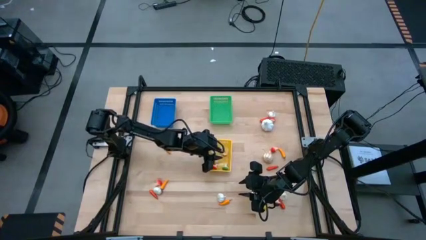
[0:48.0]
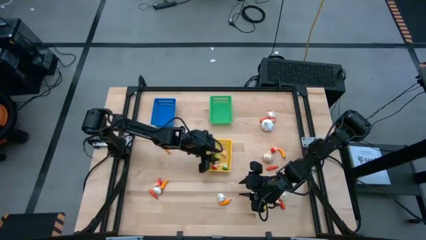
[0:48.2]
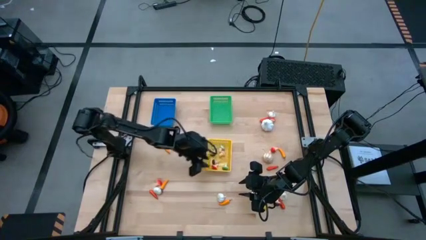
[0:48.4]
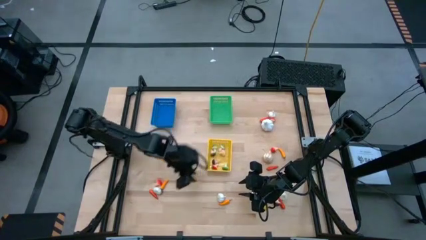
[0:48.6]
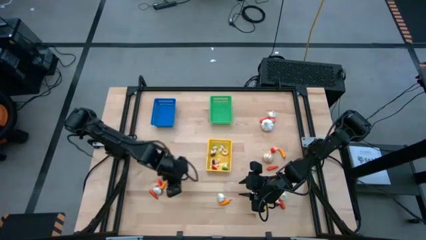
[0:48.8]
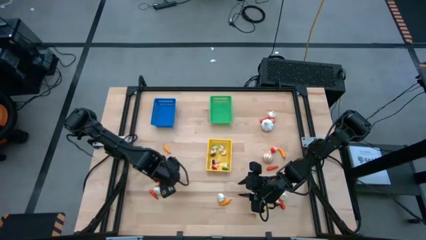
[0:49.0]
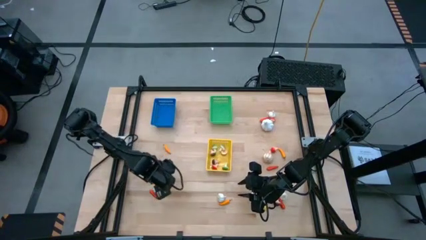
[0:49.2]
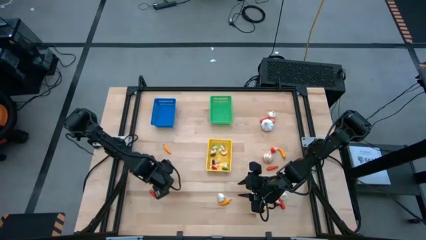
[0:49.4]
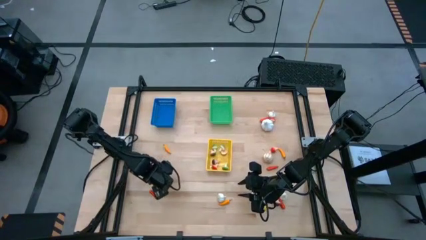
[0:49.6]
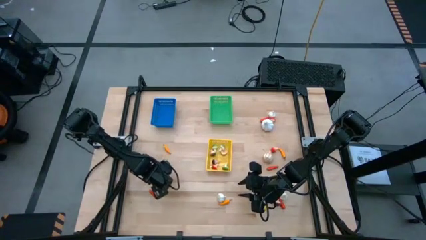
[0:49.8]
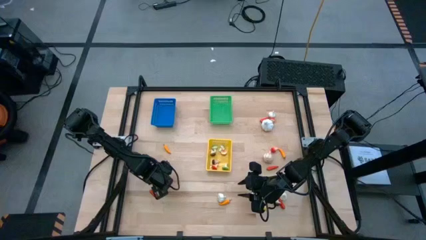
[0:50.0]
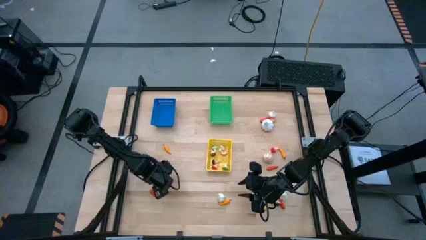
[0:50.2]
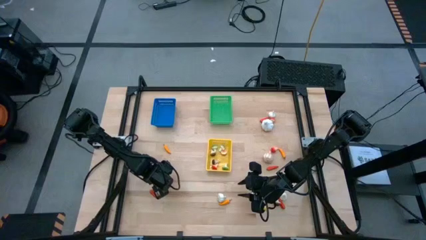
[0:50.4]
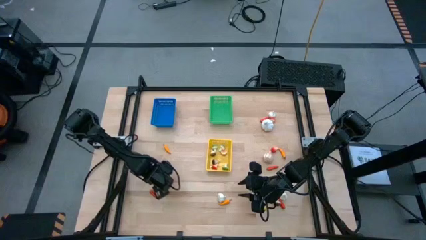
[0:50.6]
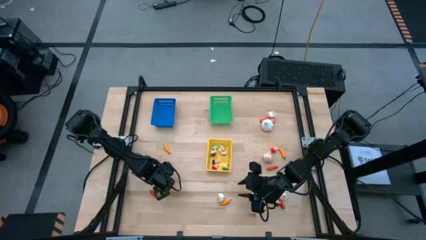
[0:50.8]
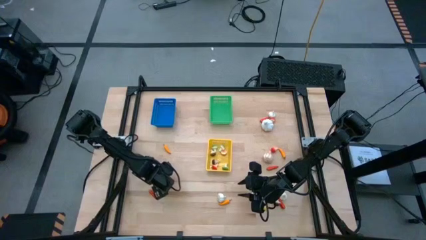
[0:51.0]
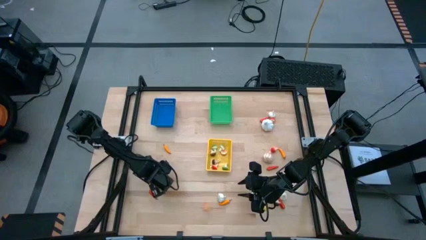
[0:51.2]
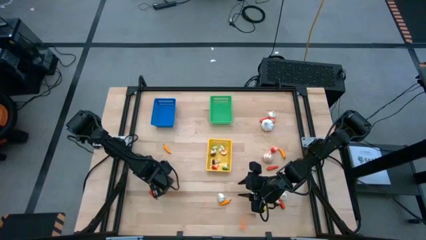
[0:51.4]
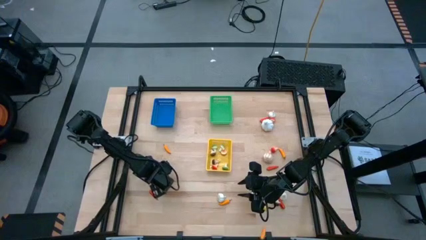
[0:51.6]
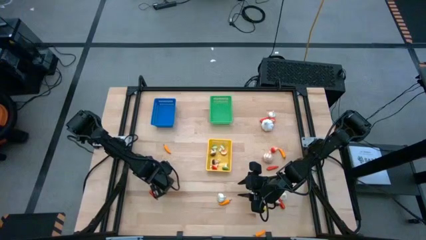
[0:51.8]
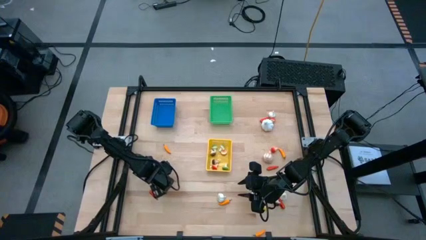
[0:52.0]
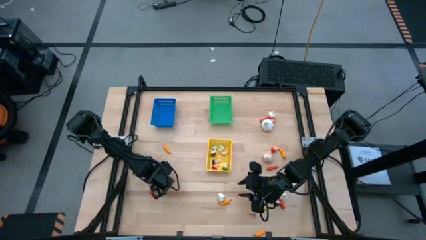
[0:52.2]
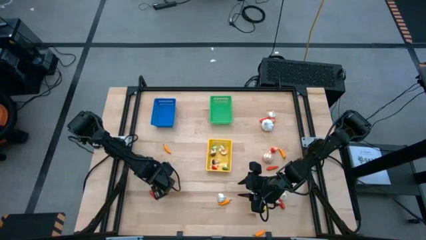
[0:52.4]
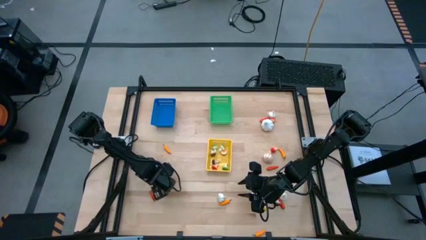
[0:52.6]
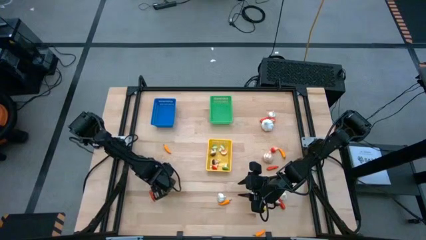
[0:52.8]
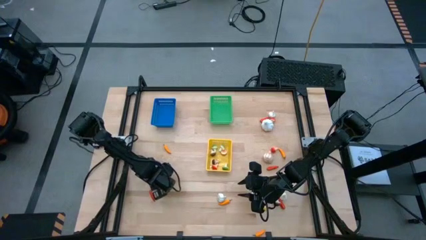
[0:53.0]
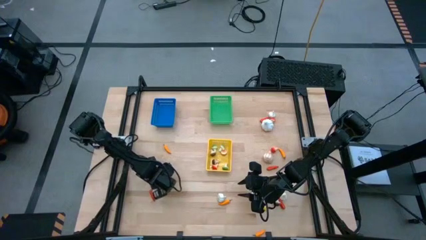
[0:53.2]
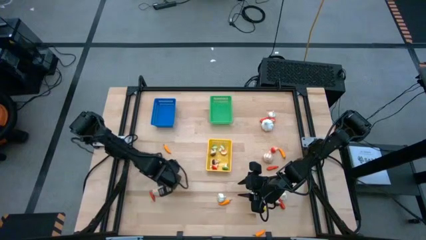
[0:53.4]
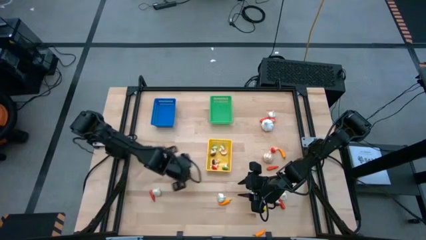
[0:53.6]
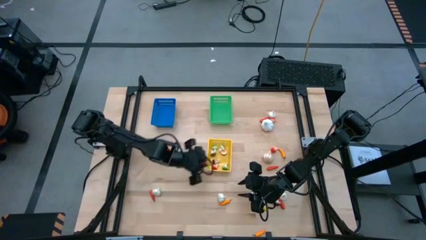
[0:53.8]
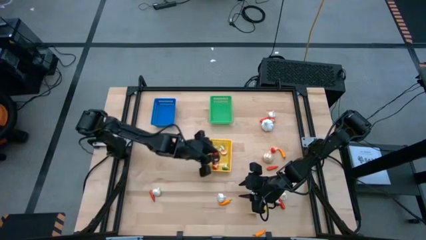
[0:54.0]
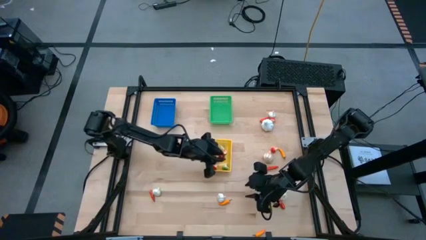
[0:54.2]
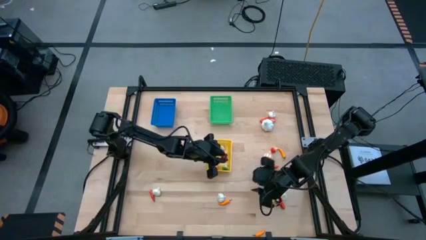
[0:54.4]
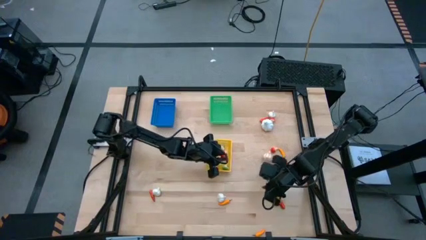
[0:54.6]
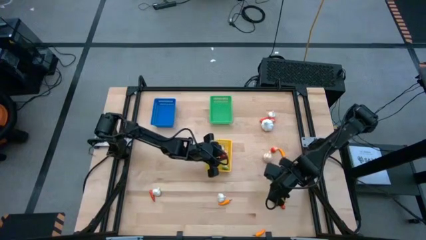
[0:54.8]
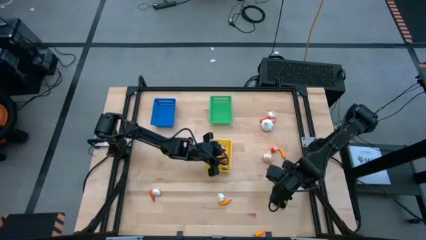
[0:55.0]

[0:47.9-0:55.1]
Task: Sort produce into baskets
Put the red mushroom into the yellow bin

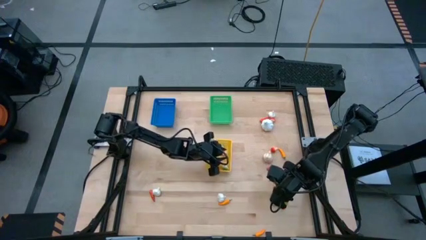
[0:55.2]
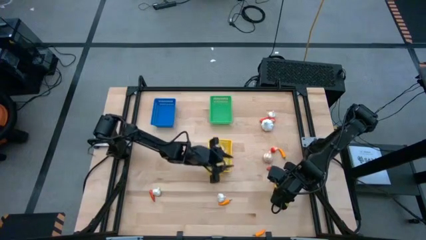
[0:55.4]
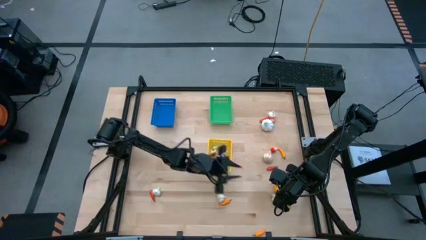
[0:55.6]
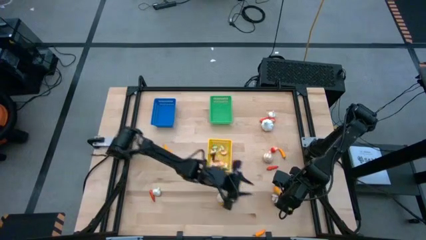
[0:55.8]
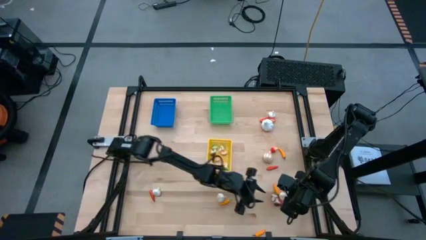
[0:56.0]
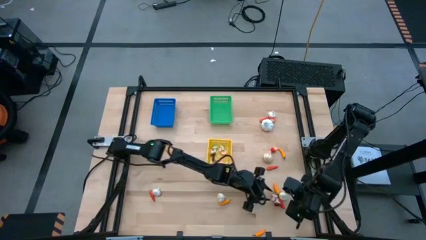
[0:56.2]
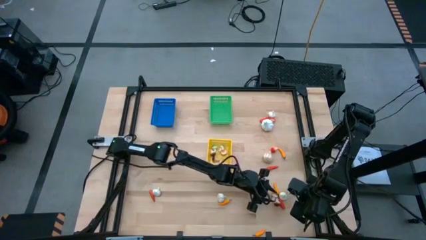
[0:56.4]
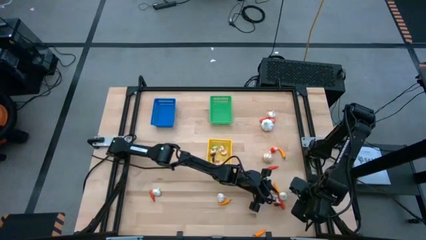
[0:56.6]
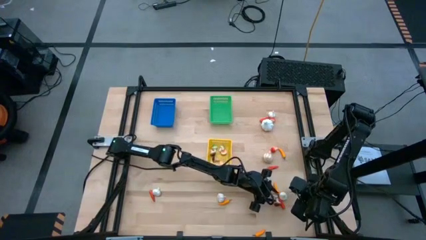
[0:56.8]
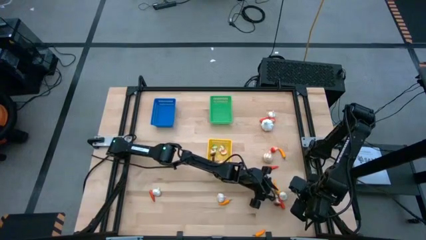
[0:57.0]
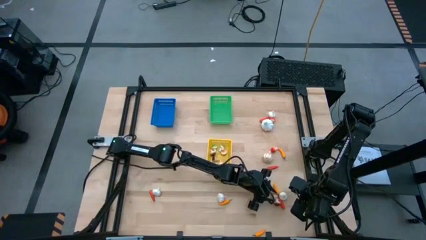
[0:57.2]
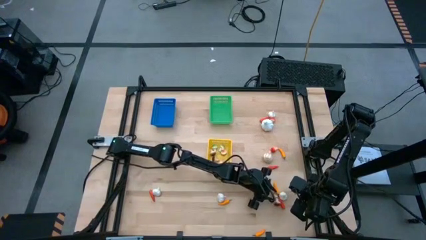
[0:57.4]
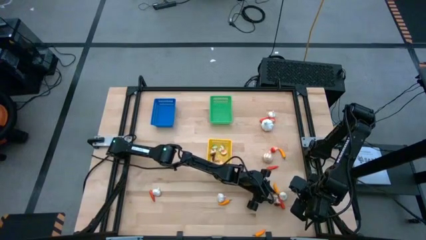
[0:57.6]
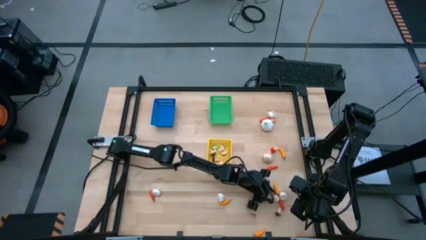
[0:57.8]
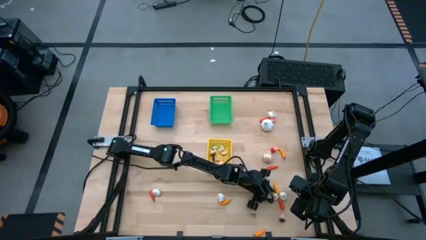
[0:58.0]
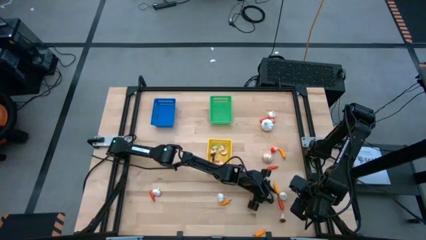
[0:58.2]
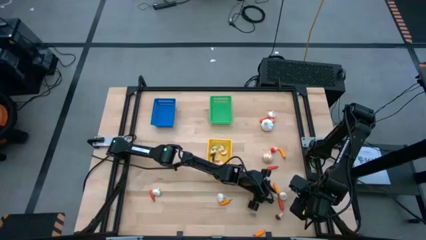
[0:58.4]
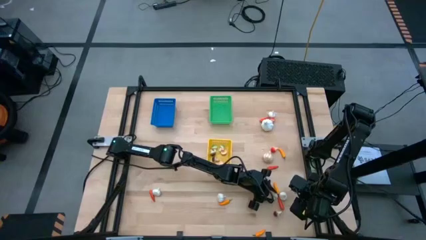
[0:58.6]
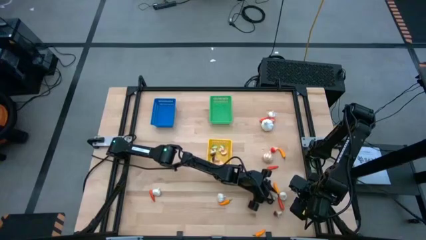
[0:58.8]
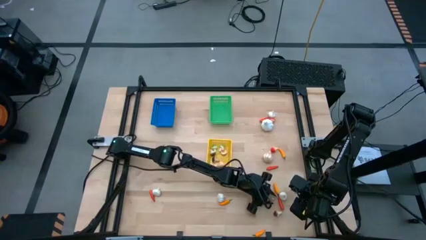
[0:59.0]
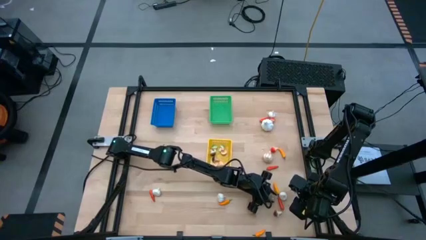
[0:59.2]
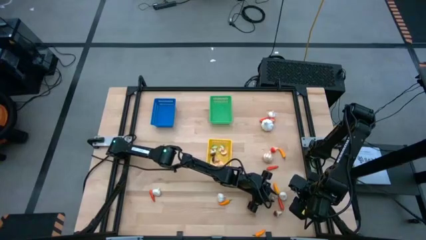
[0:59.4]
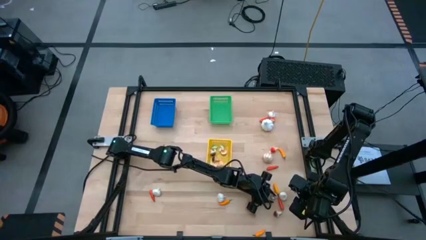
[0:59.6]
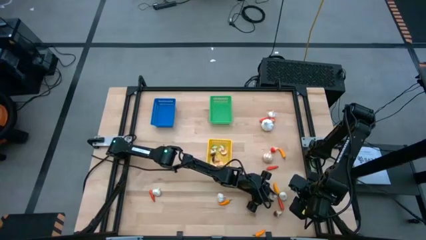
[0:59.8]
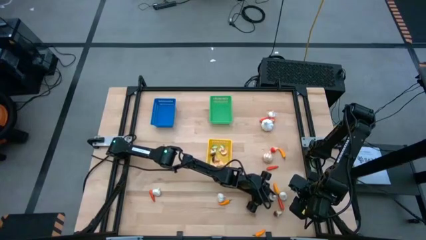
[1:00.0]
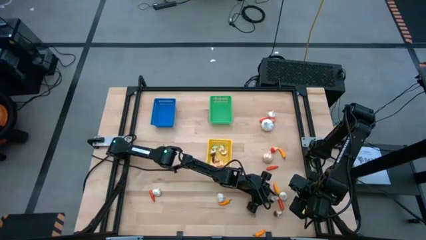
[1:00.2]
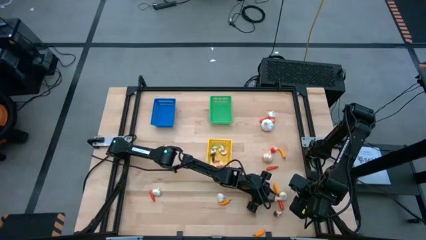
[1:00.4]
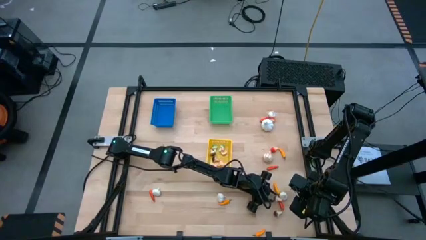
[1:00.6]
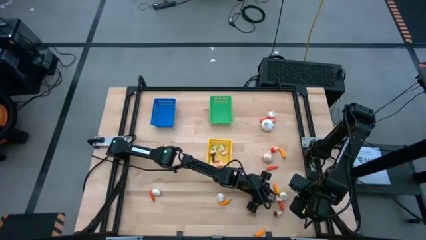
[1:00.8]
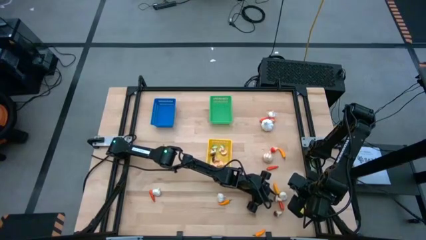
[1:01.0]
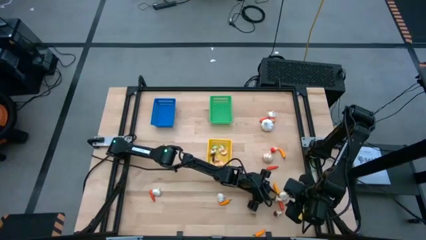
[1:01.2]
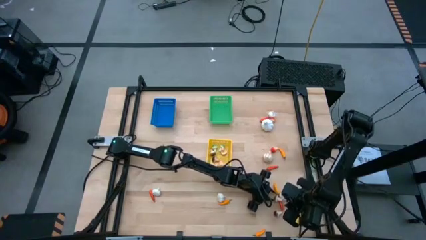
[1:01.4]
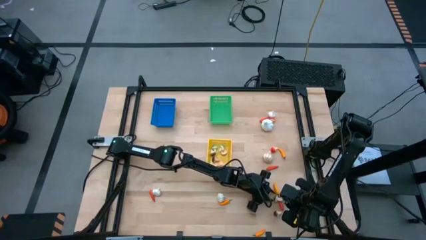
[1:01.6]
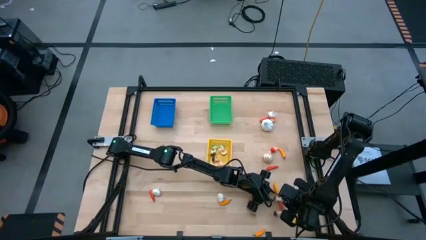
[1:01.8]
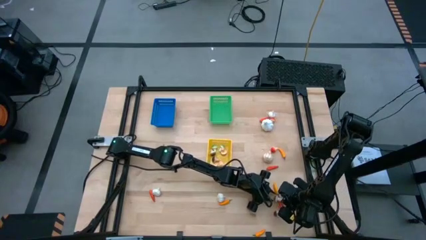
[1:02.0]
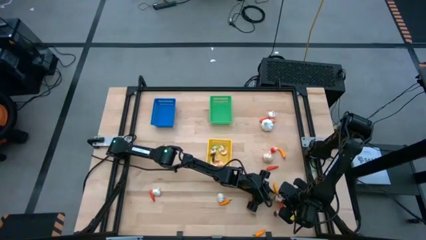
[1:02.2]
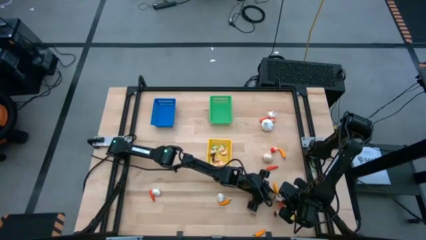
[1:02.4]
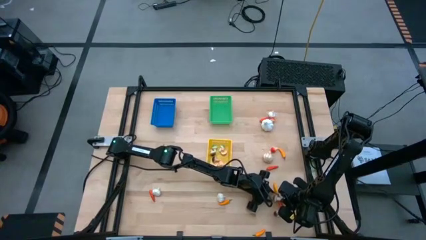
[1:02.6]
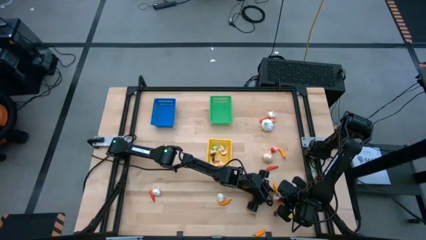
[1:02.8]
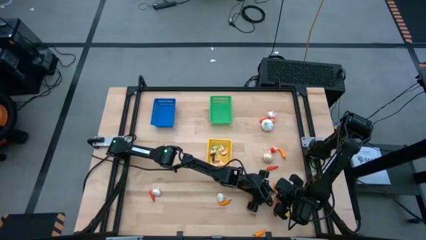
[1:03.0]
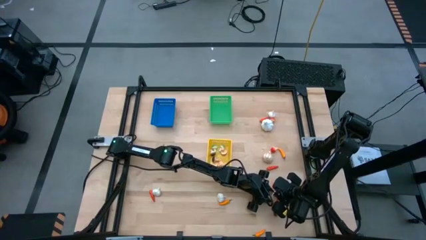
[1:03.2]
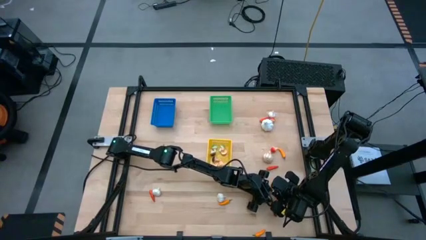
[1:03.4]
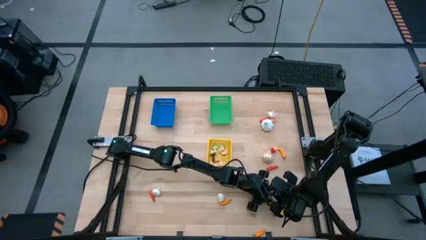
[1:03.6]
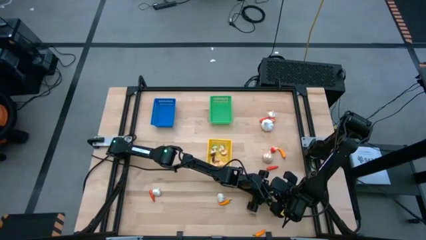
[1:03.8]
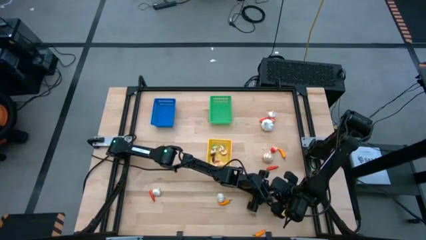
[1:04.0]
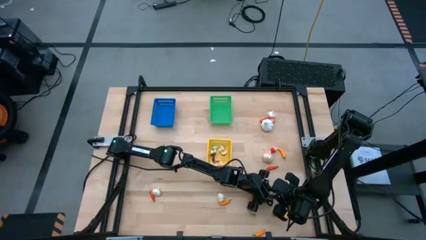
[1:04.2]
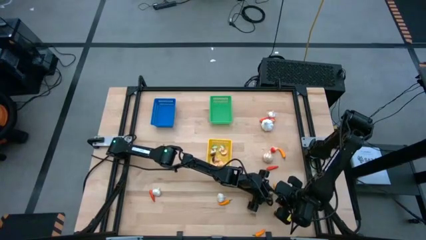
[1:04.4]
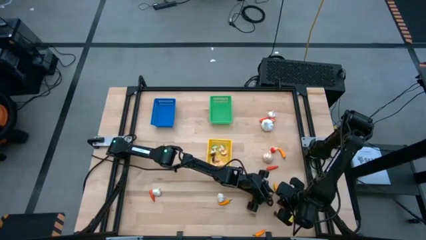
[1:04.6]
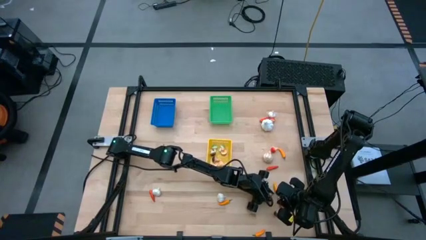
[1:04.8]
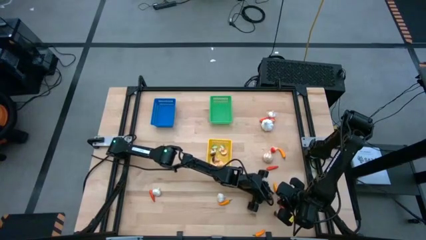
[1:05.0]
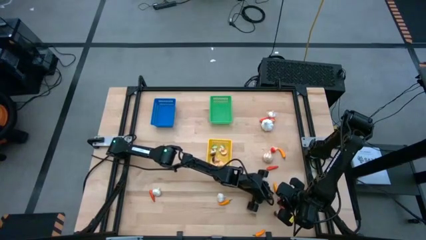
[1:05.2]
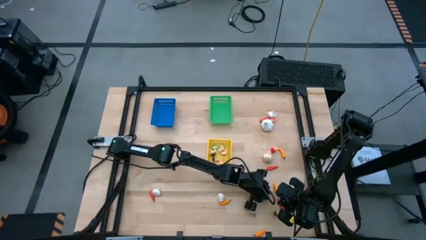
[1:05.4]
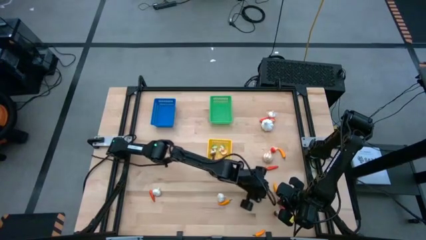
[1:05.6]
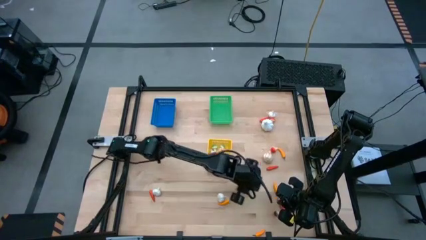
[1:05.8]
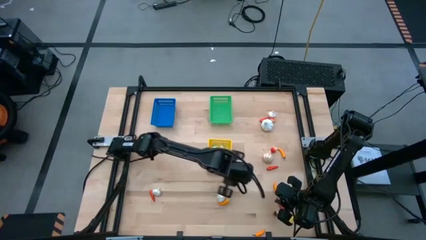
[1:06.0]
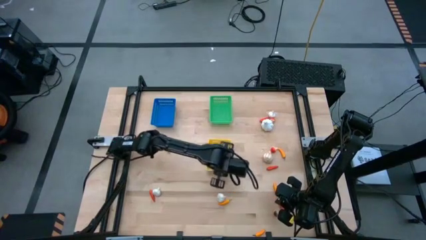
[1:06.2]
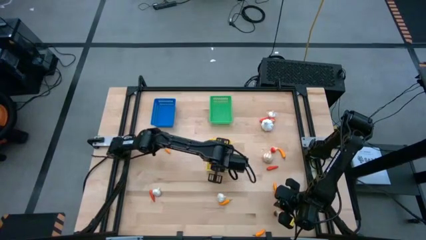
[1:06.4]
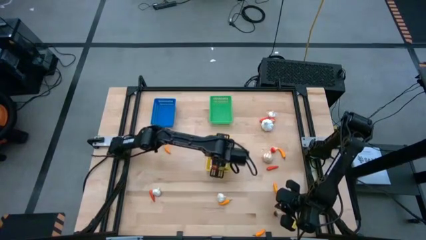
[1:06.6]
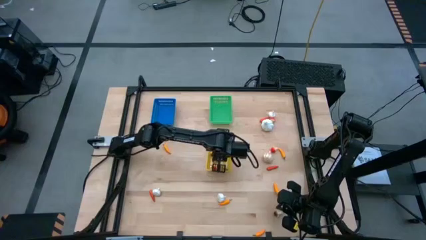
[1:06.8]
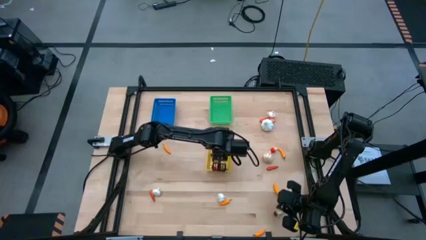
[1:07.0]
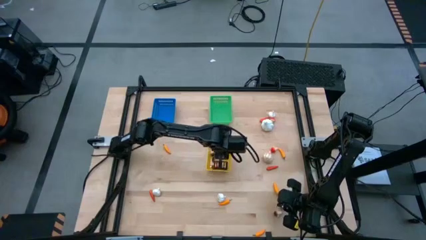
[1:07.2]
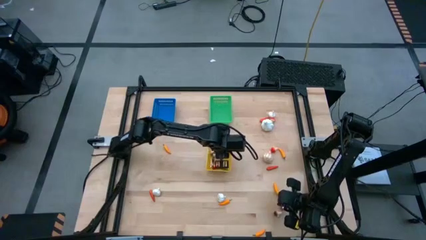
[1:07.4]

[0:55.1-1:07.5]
Put the brown mushroom into the yellow bin
